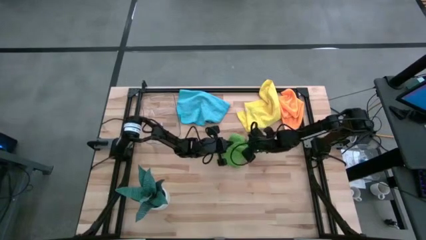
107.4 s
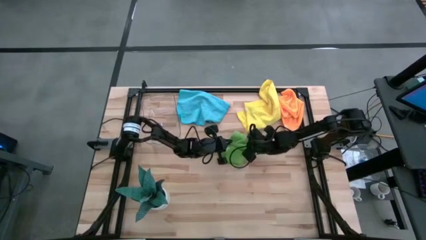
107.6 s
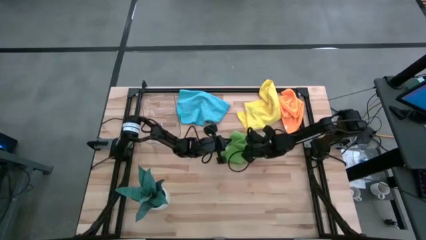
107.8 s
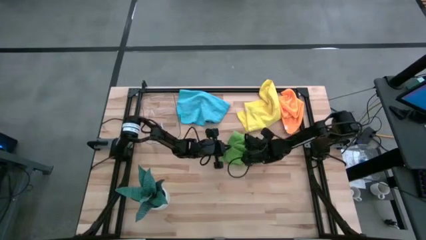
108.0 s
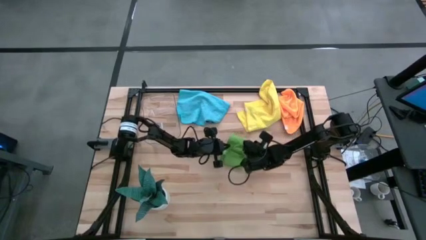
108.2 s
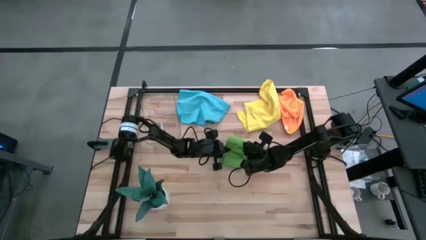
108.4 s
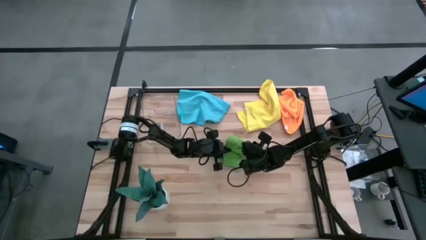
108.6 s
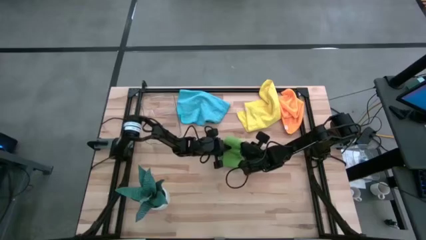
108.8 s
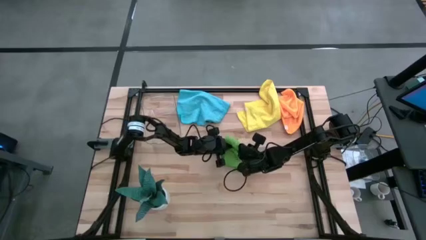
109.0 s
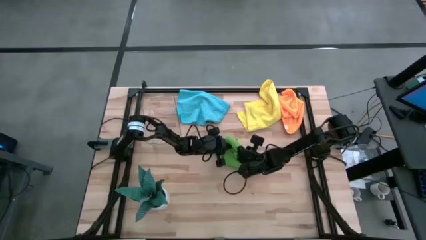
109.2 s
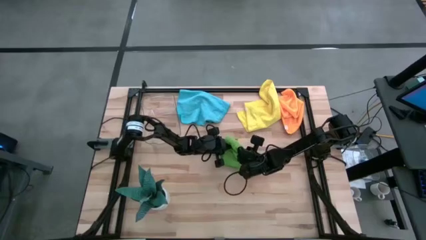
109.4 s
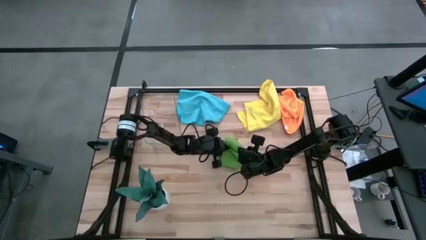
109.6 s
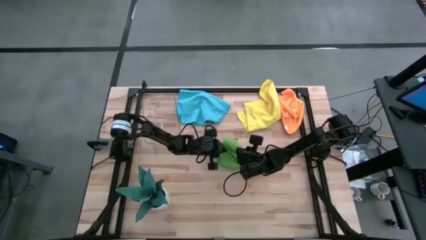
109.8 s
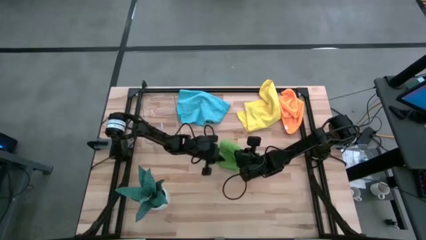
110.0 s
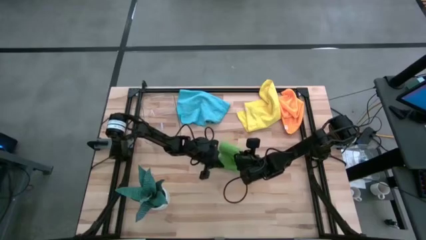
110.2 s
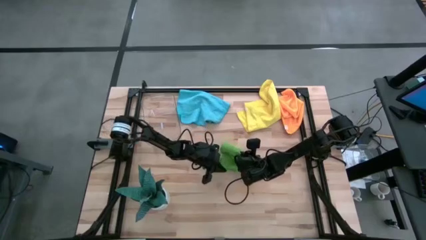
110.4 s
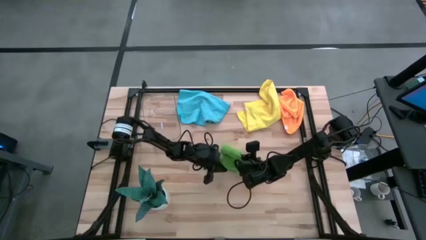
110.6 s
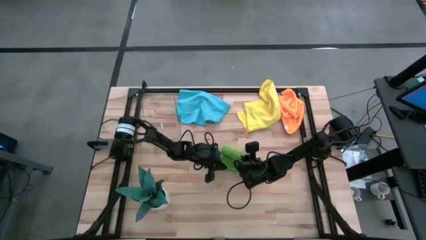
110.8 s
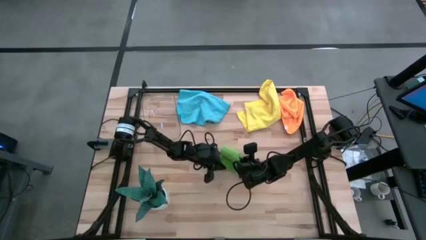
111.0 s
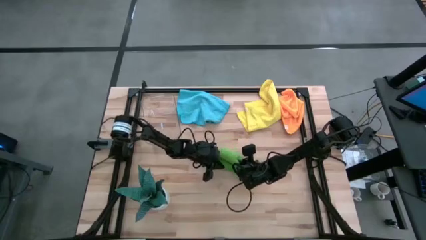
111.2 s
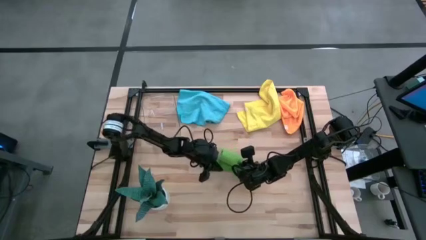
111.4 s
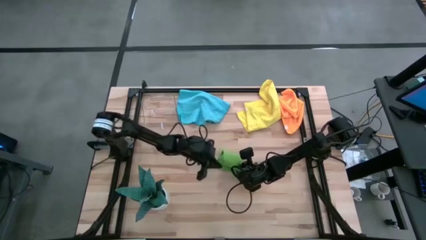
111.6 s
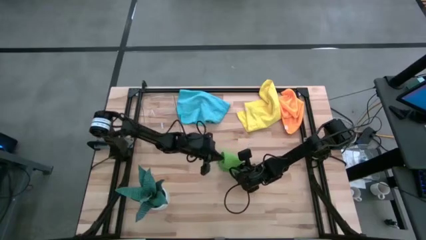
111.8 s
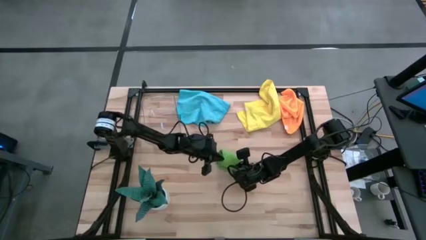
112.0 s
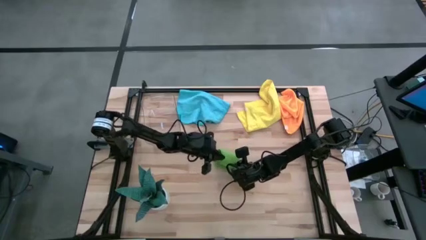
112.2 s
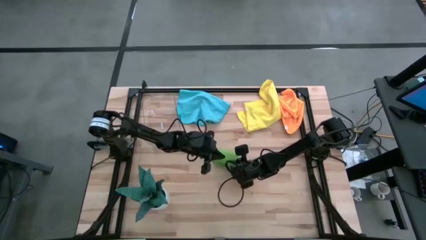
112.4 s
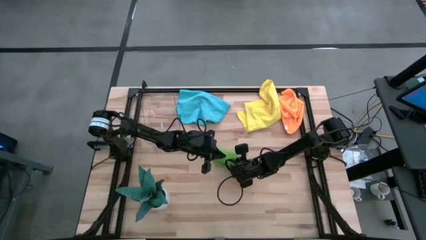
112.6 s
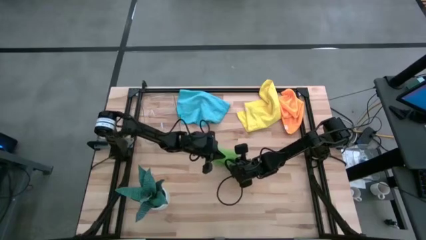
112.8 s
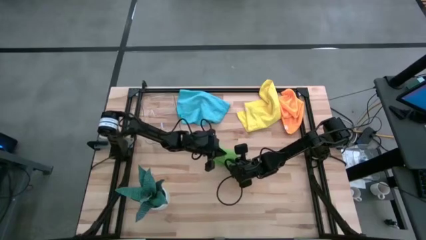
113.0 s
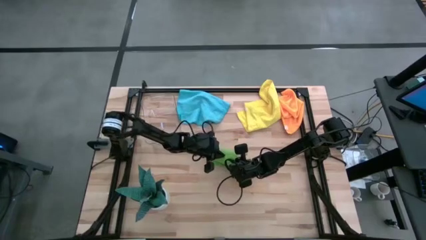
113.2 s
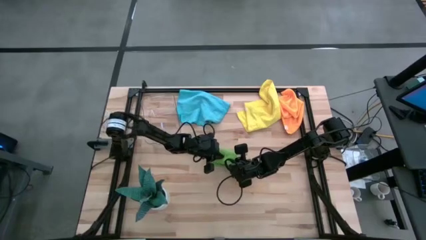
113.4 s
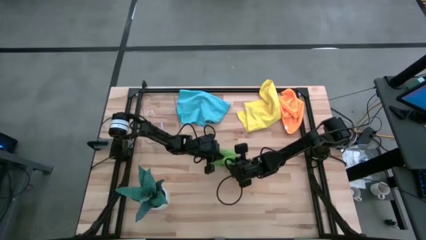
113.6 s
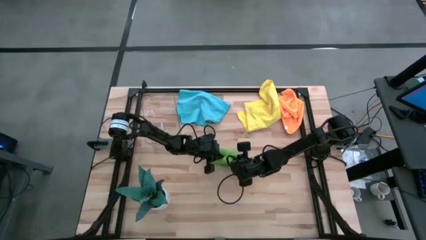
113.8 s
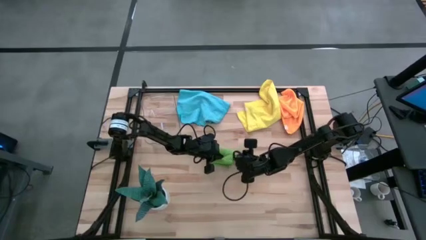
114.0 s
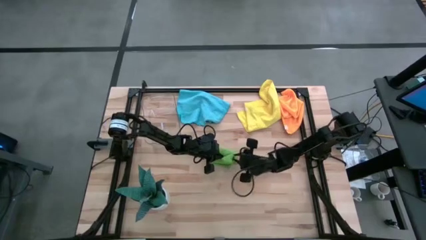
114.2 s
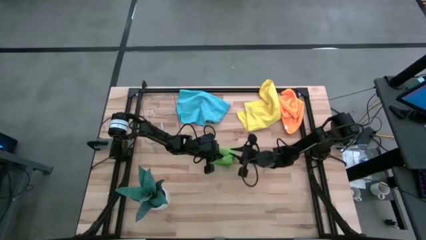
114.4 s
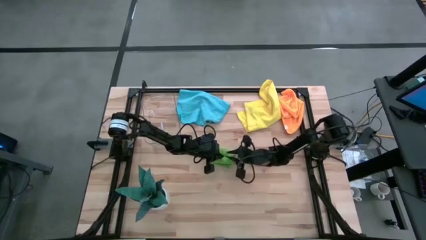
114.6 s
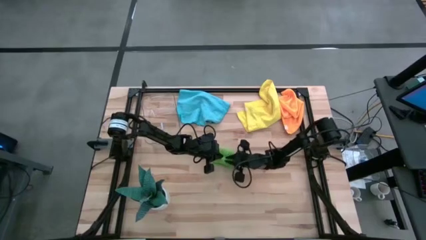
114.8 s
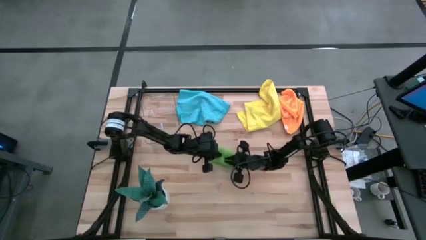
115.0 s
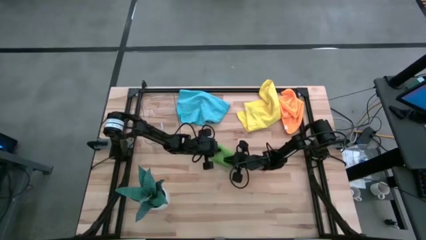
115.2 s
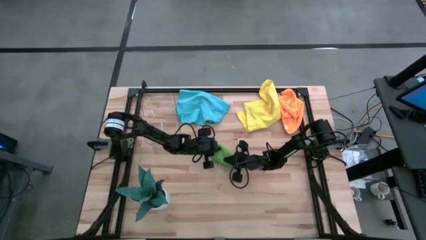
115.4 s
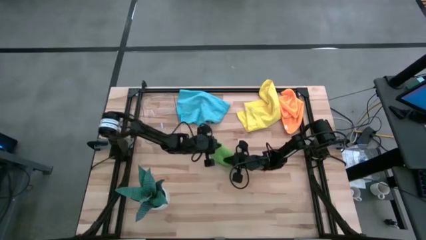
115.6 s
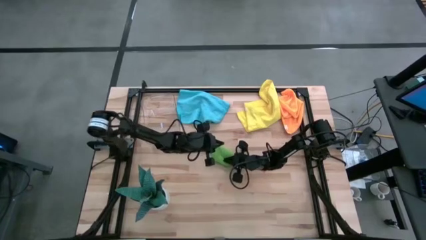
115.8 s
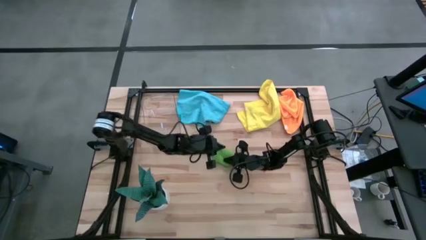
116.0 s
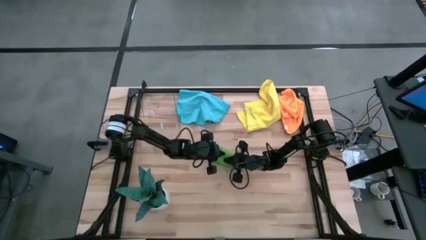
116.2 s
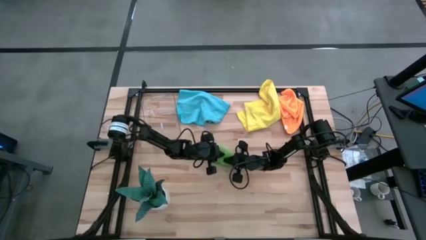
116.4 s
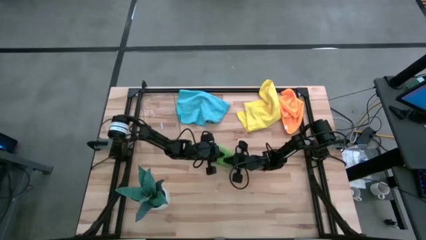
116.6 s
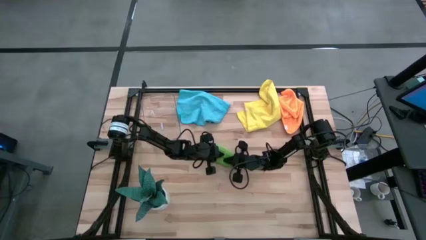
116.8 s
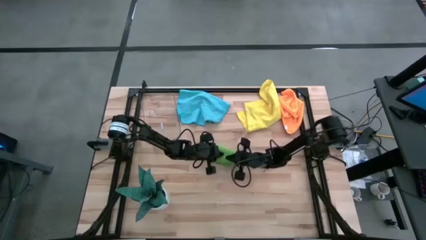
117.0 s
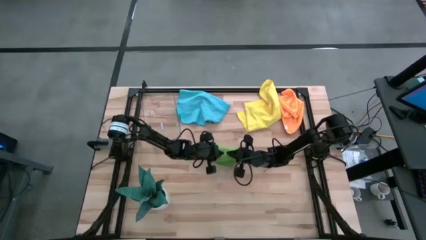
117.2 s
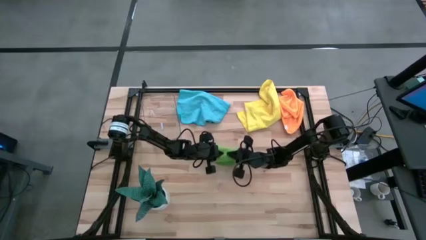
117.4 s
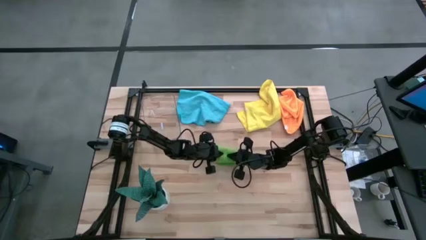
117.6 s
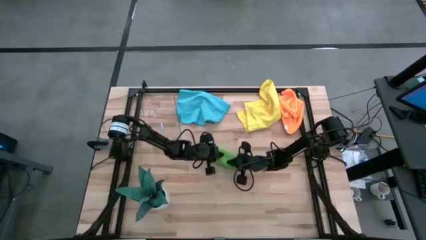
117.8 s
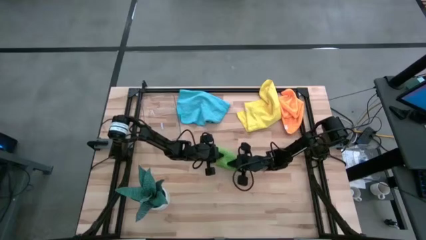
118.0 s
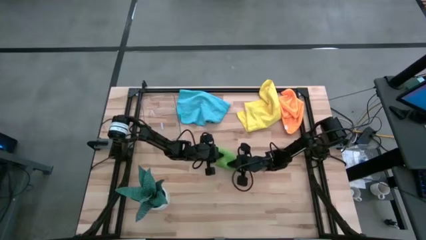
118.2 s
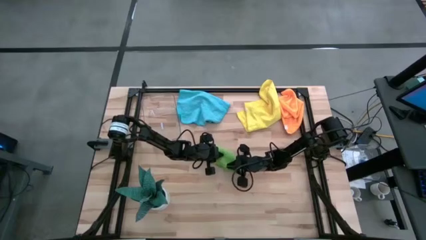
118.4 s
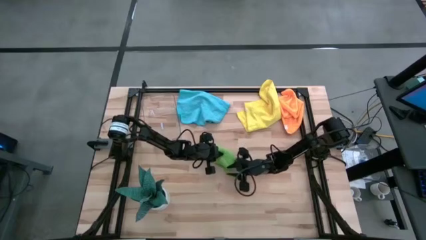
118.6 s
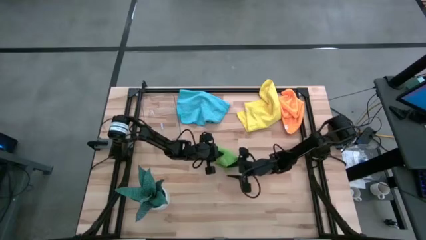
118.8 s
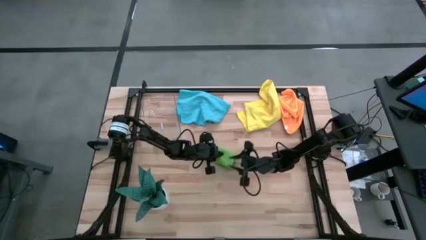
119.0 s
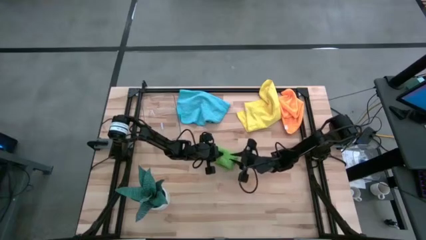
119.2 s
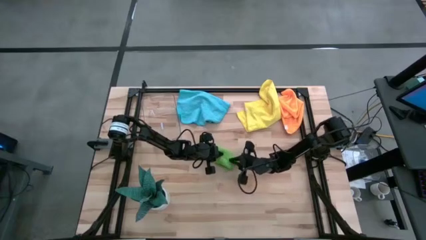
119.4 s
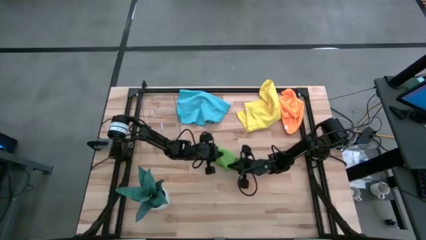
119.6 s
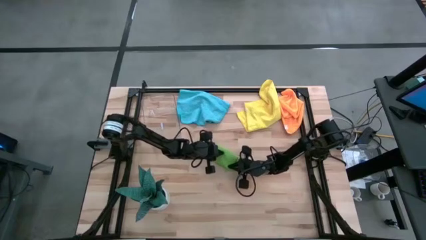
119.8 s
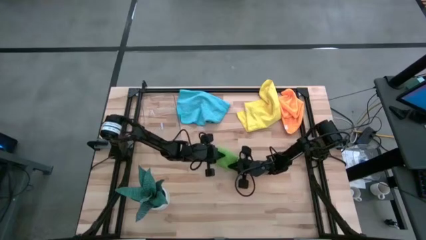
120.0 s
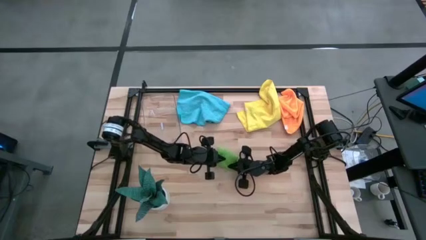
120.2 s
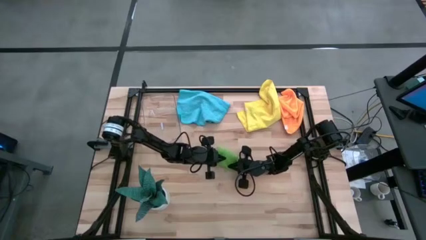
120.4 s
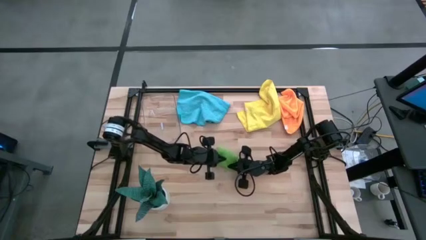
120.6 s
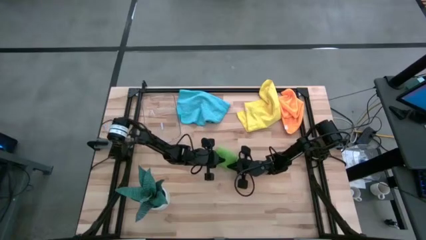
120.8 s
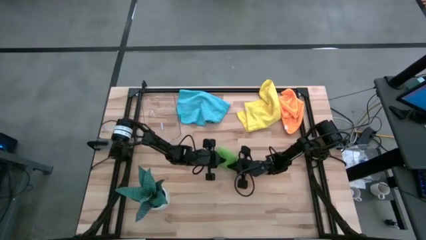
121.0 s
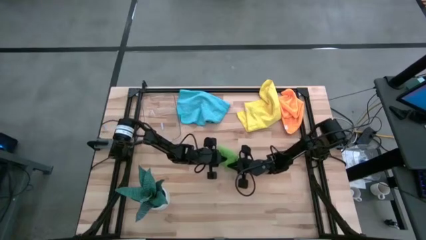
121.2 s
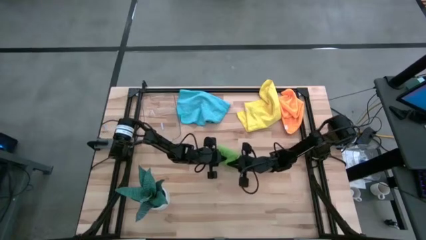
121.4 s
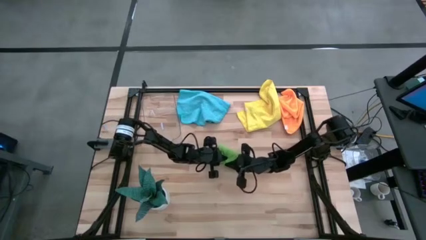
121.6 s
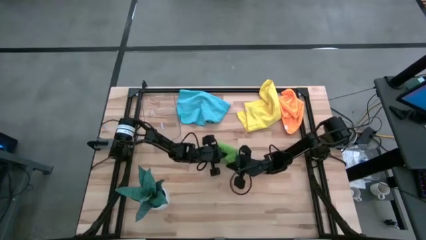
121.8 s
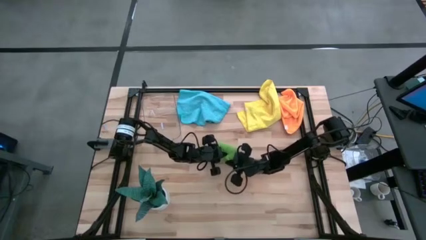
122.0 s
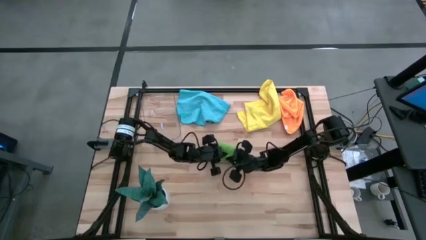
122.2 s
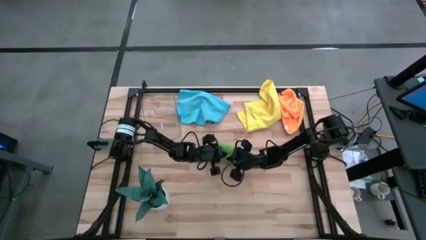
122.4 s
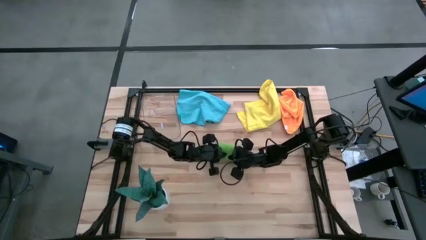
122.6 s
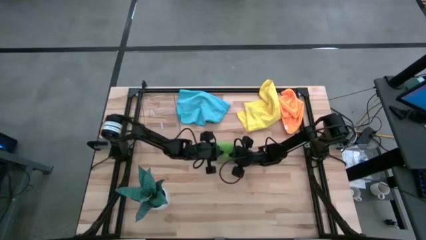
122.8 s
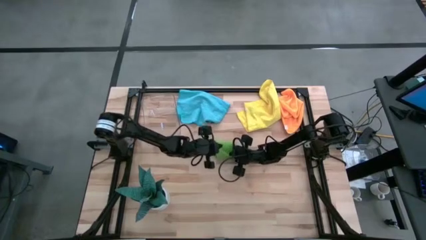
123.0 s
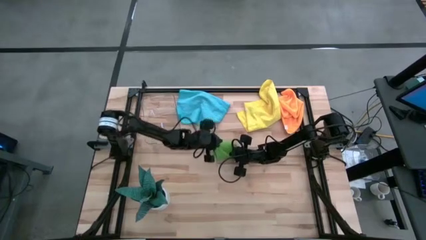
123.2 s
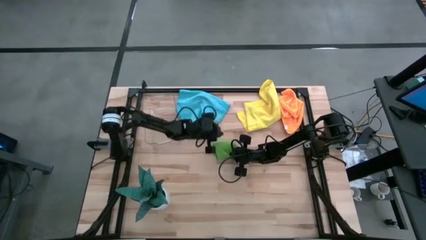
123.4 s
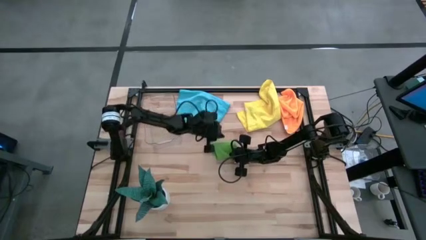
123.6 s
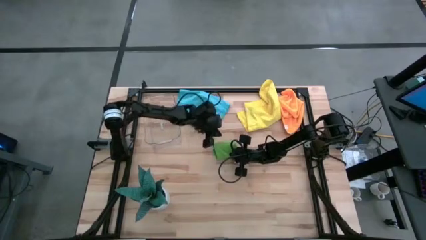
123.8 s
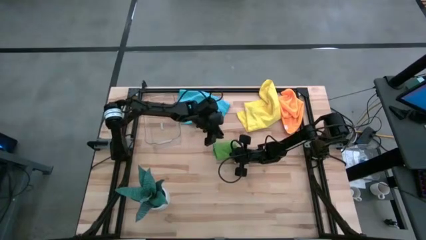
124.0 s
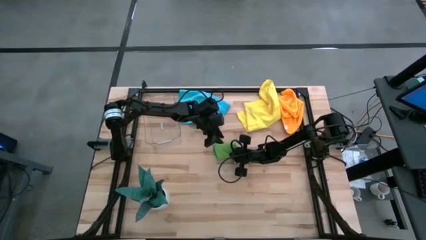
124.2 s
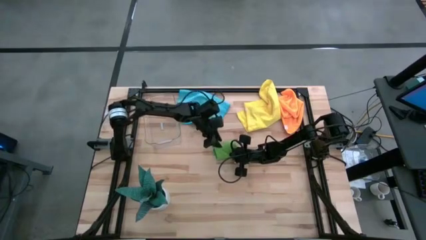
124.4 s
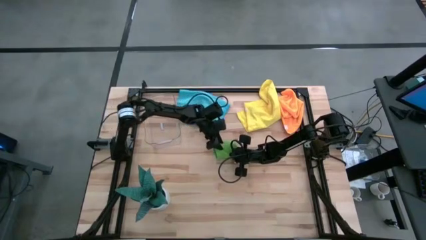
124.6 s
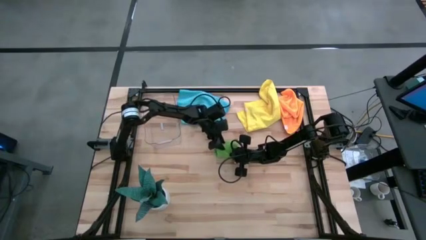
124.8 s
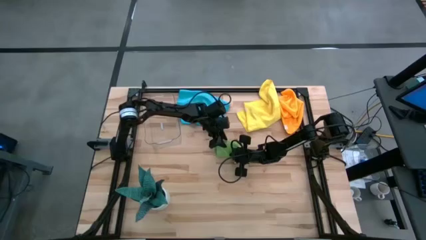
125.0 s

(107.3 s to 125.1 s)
Task: Roll microfiber towels into tight, uniform cylinder then place into a basket
Roll the green microfiber towel
